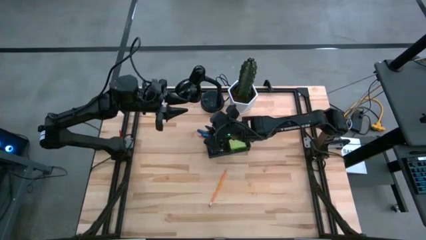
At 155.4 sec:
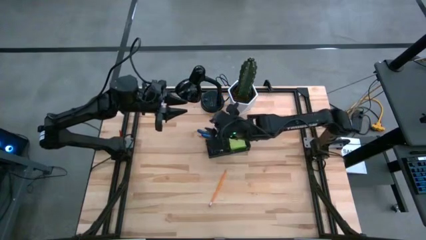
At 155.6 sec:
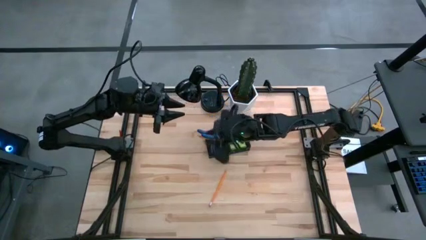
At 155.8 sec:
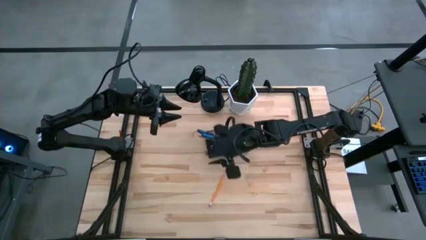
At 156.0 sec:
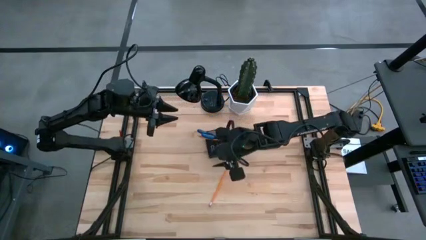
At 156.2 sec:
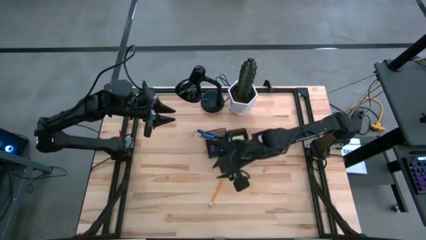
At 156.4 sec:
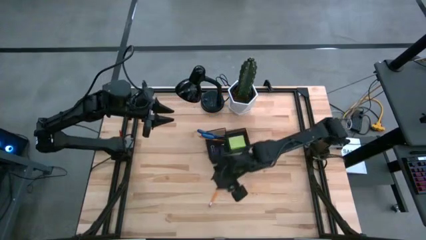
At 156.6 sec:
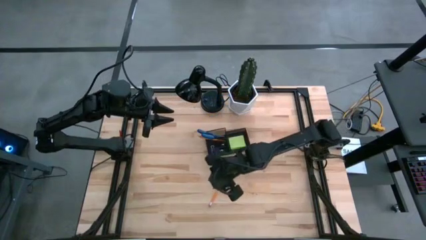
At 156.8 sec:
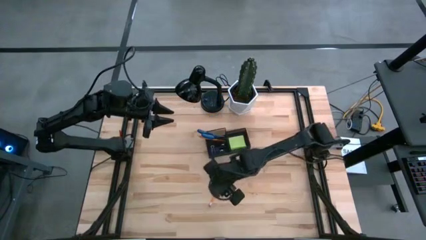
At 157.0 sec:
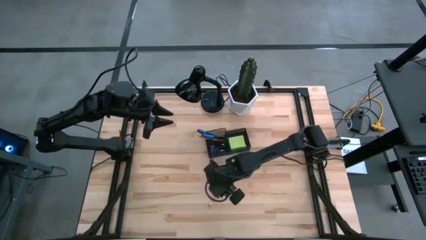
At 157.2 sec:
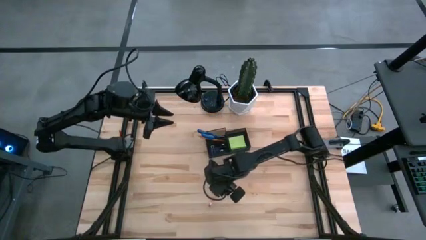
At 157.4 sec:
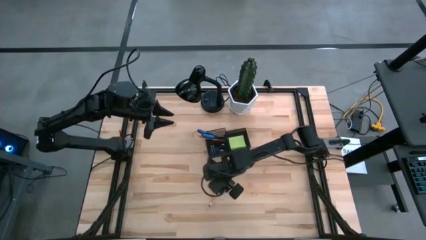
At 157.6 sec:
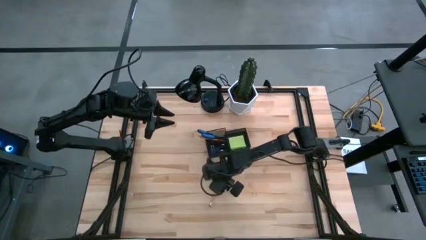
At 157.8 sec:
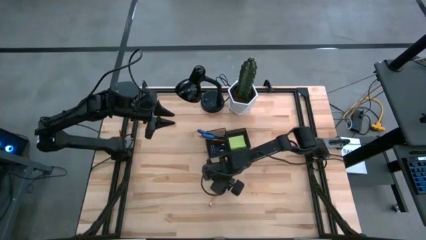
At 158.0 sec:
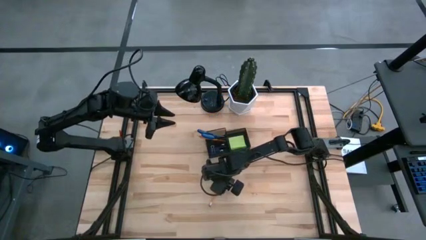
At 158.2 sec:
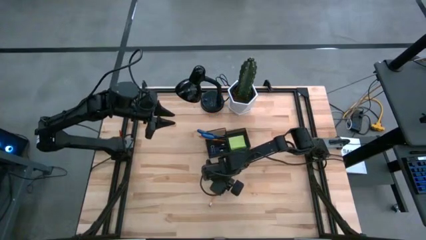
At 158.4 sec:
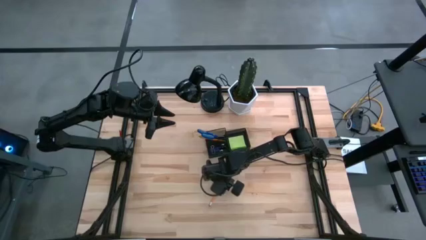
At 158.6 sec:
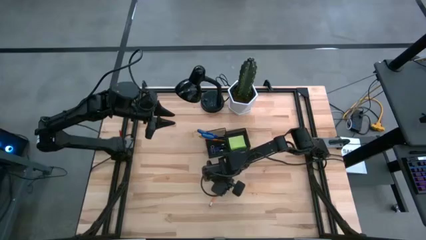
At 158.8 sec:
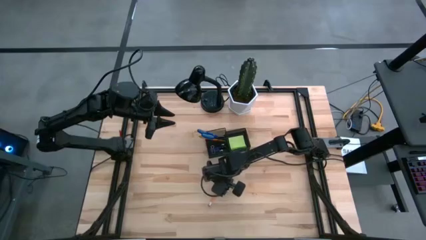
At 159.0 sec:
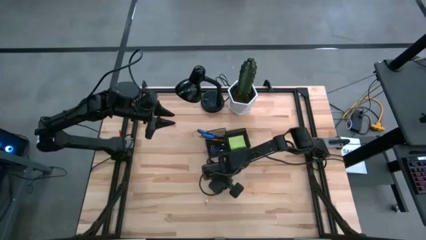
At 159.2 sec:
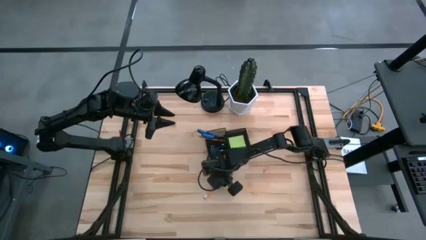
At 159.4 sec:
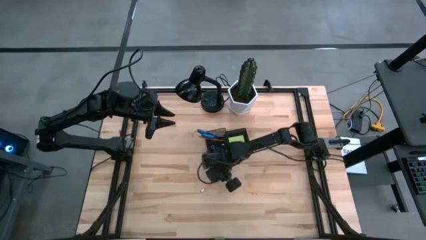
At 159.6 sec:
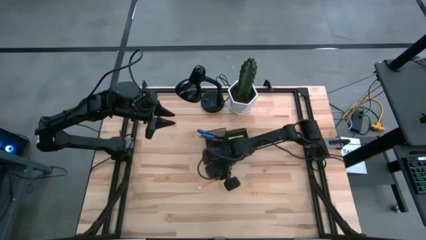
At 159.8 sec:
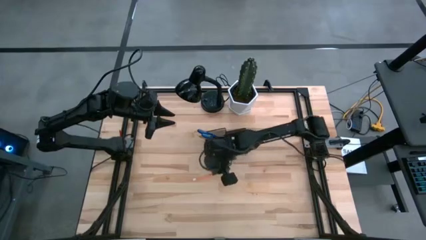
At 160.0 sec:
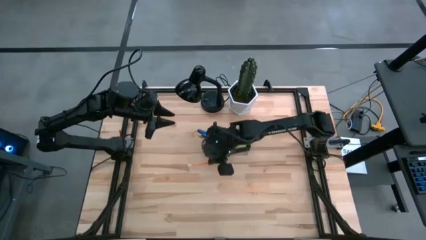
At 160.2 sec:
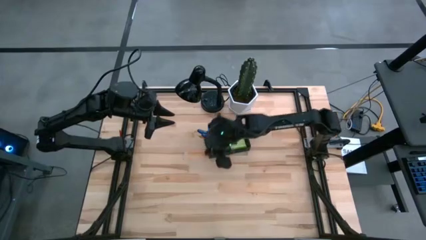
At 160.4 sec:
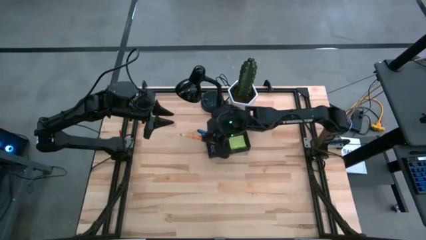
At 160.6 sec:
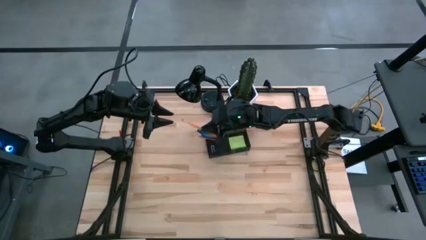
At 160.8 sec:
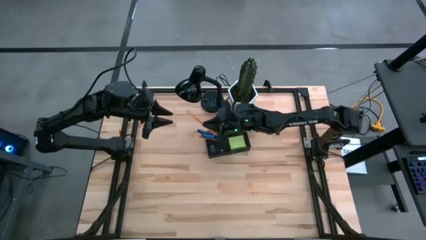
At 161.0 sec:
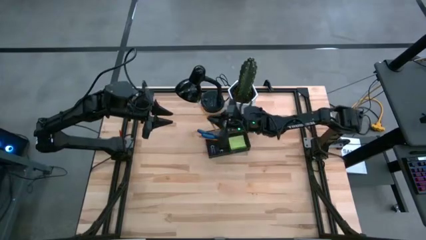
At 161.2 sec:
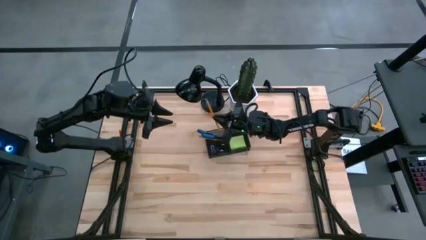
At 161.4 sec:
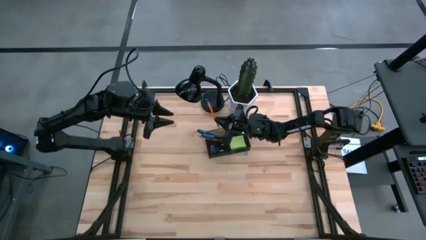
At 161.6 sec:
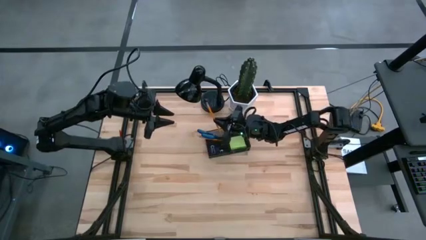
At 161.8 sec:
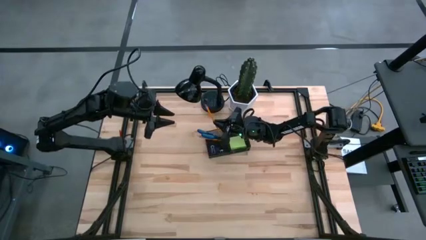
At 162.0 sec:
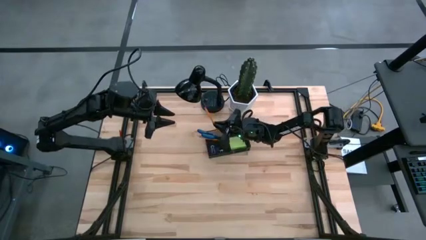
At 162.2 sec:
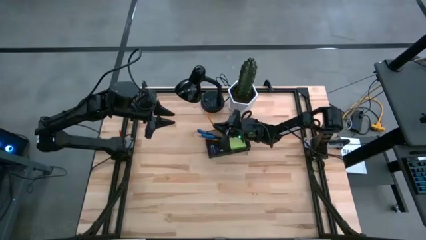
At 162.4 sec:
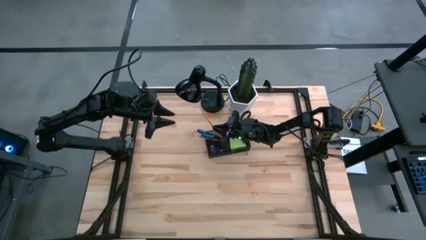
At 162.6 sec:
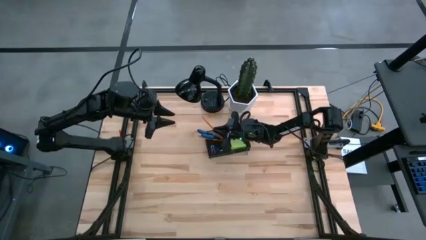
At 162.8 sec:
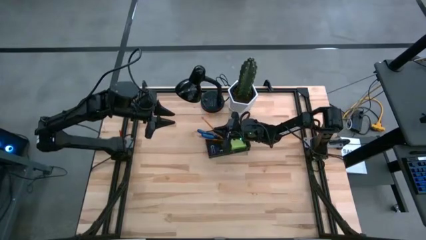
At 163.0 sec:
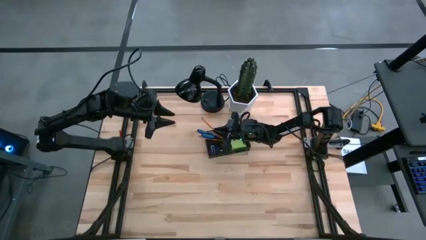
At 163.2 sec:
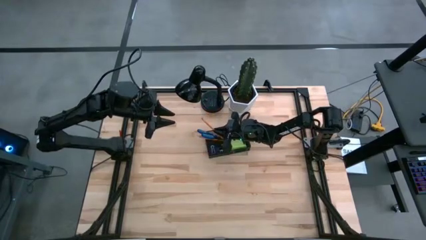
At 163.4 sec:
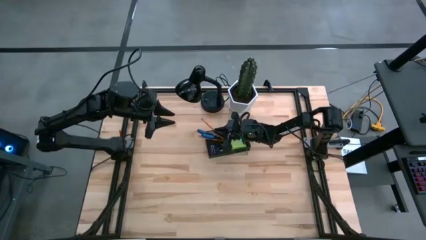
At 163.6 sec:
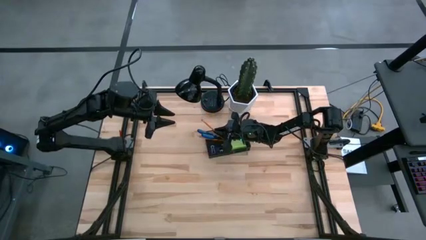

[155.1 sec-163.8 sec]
Task: Pick and place office supplies into organizer
Put the yellow pencil into the desk organizer

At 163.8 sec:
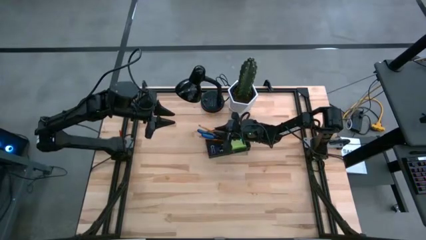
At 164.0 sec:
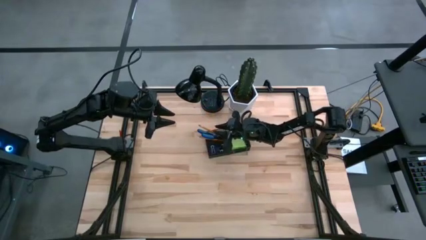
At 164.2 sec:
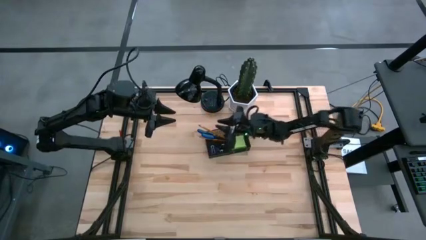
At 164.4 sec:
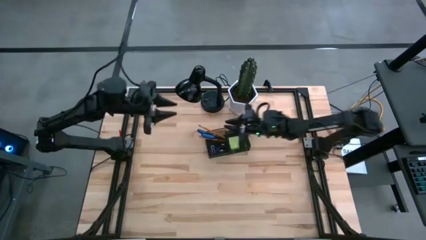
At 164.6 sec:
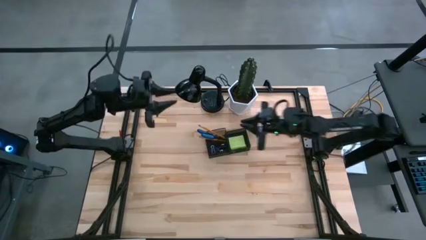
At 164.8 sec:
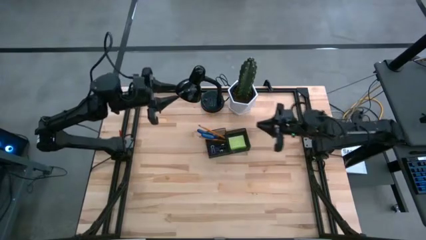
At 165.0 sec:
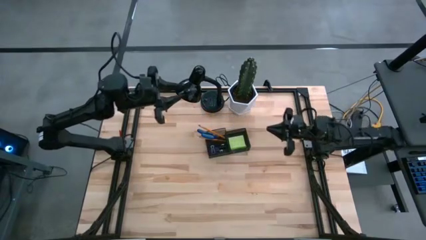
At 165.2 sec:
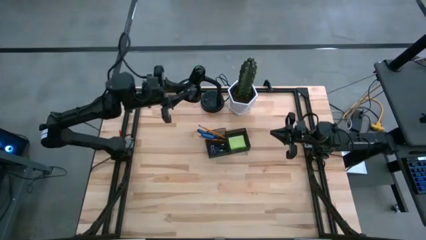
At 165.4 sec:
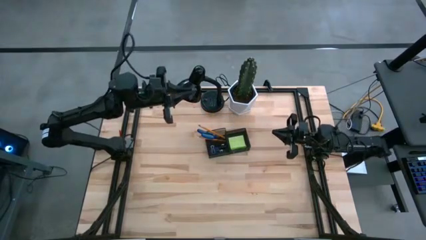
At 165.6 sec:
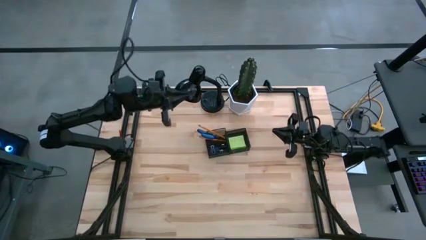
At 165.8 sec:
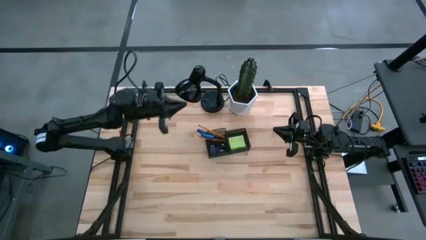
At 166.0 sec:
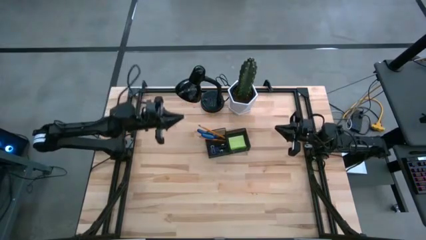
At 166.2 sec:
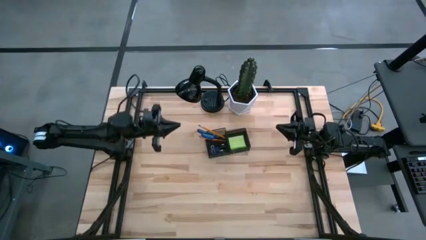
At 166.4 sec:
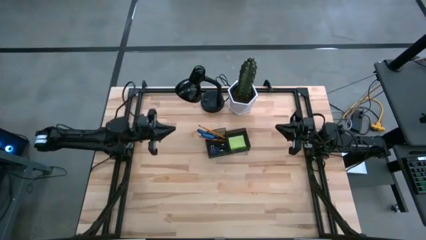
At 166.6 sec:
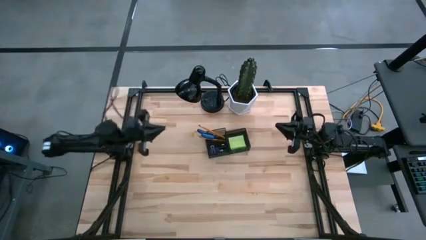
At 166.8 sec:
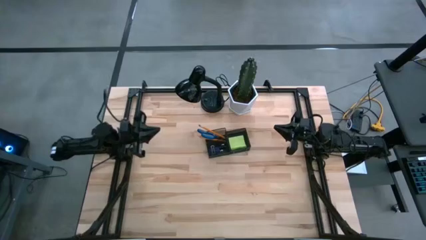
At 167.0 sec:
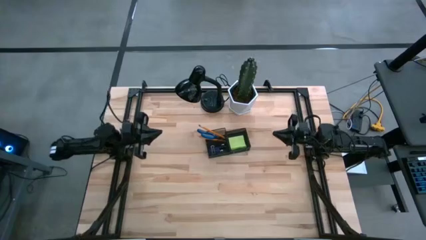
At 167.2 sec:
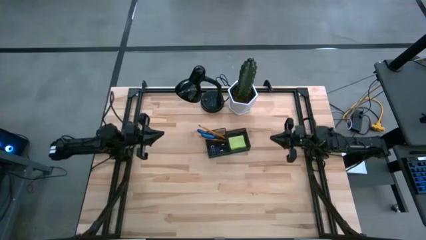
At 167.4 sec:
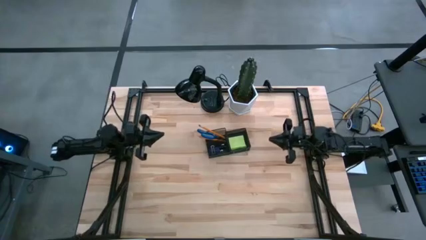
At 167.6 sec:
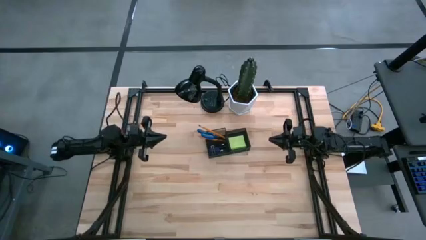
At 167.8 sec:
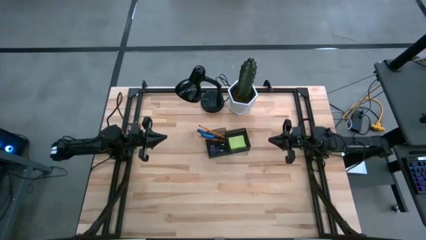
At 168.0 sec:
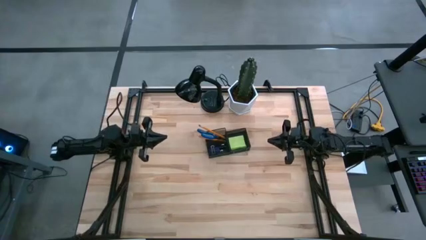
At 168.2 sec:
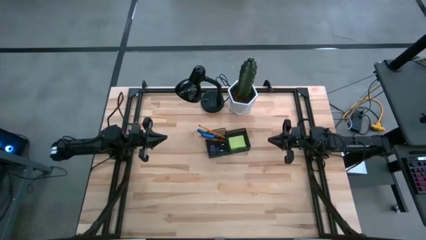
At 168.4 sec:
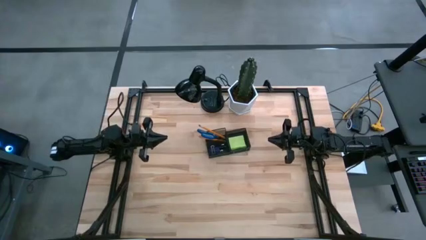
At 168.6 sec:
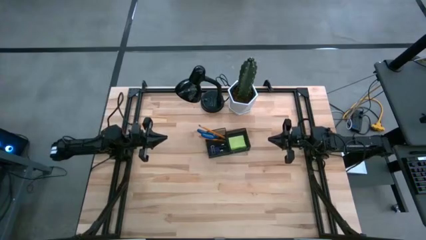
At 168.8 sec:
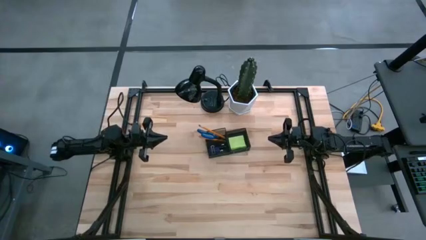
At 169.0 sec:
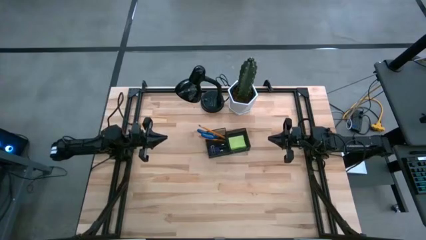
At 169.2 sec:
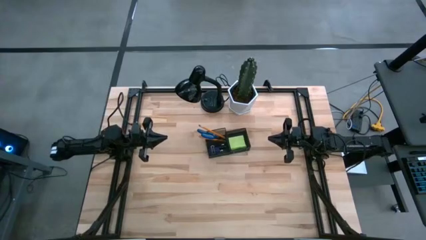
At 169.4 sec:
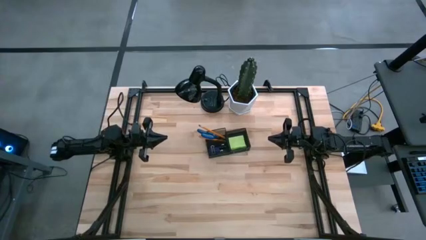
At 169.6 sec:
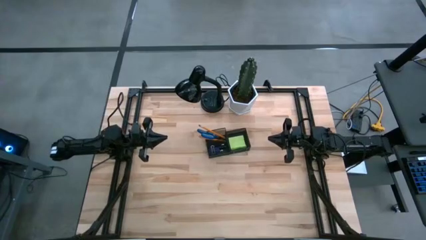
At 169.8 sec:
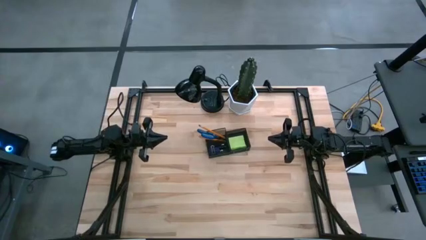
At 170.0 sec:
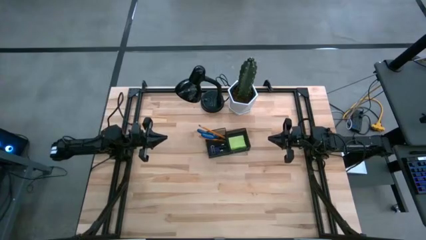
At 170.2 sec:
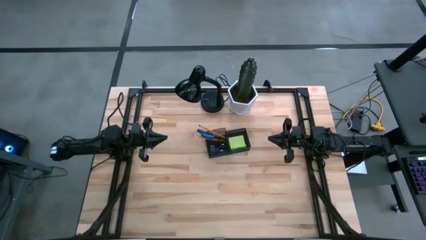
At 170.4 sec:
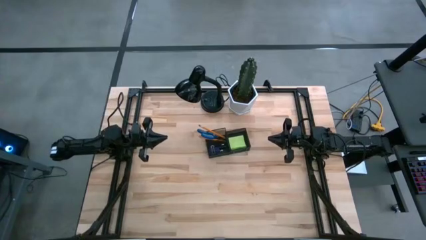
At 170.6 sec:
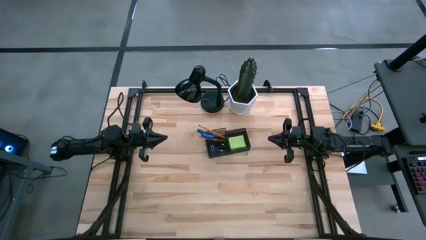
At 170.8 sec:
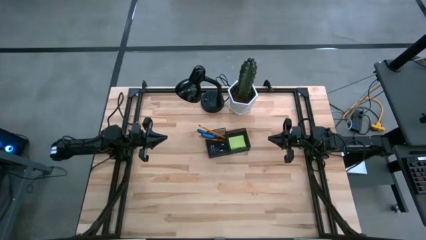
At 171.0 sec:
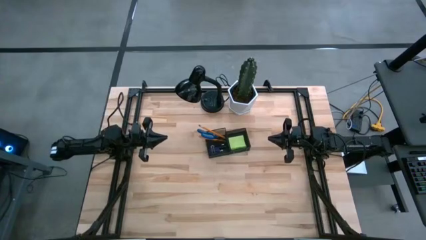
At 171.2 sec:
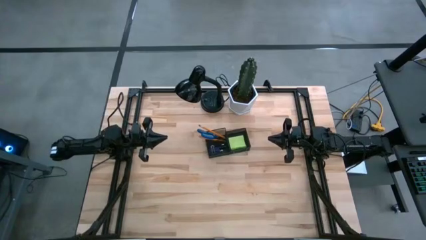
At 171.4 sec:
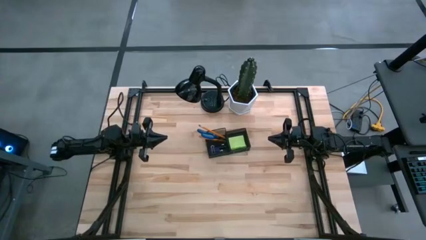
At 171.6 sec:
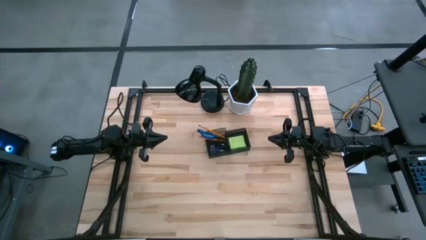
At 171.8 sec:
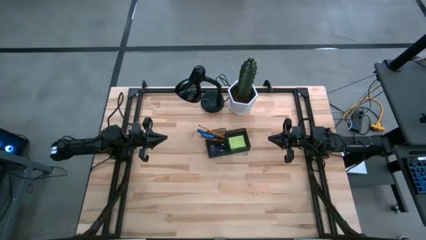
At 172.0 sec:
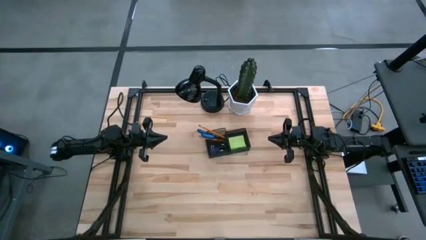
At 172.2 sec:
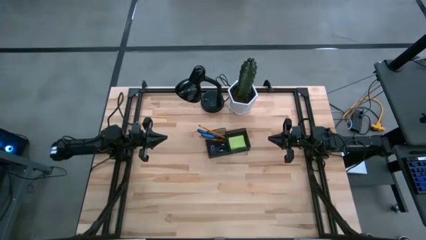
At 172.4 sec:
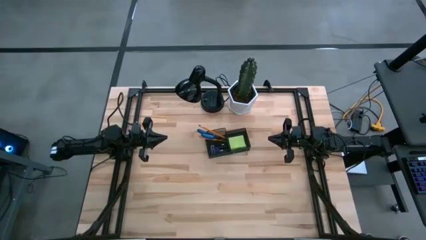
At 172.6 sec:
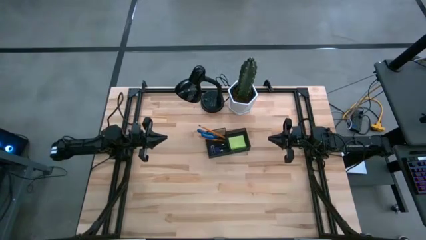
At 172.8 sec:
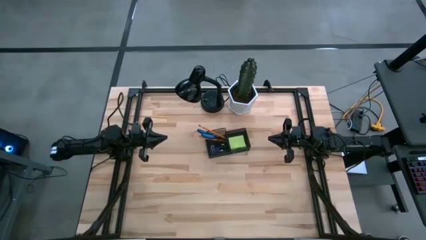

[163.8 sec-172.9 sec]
Return to Home Position
